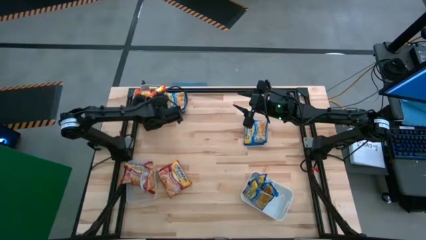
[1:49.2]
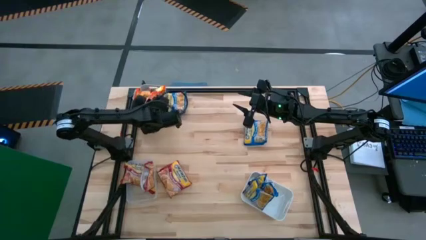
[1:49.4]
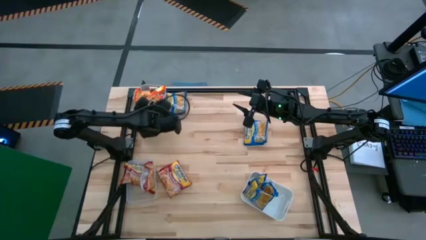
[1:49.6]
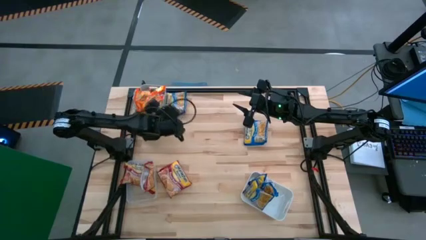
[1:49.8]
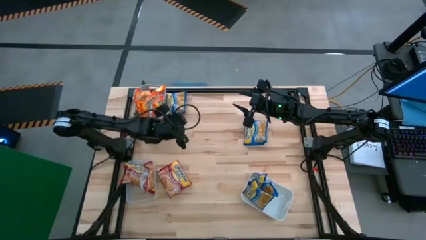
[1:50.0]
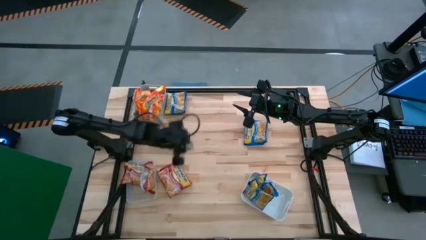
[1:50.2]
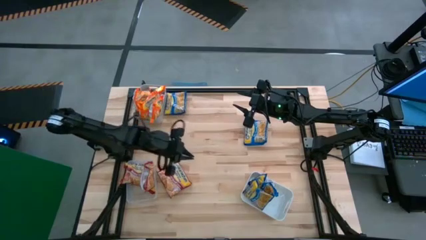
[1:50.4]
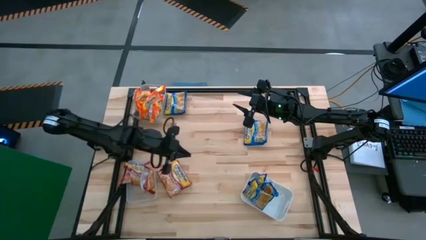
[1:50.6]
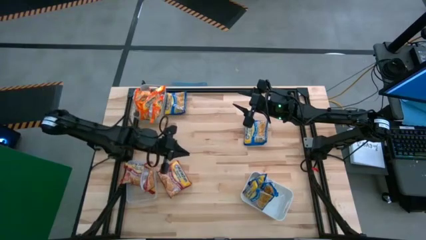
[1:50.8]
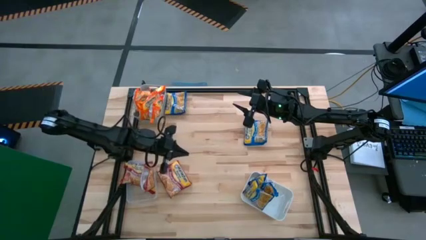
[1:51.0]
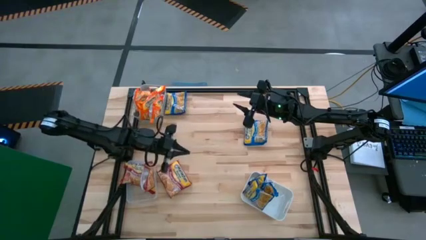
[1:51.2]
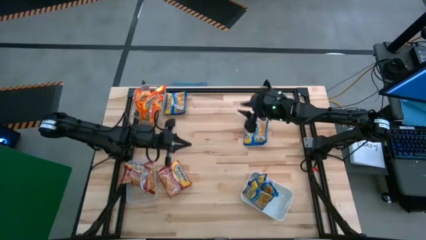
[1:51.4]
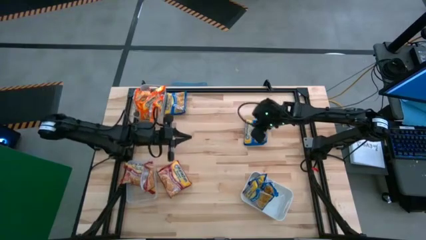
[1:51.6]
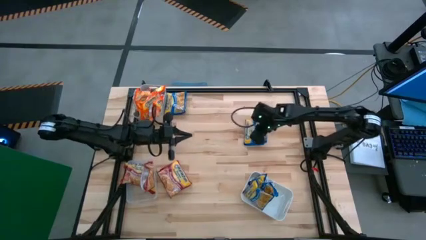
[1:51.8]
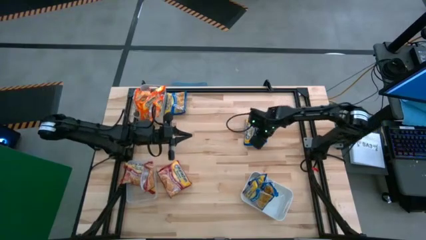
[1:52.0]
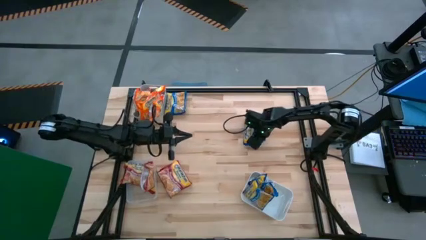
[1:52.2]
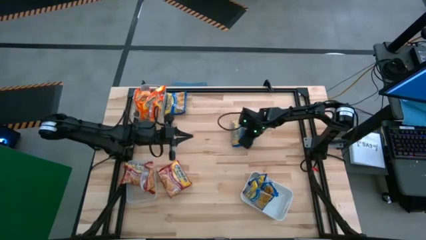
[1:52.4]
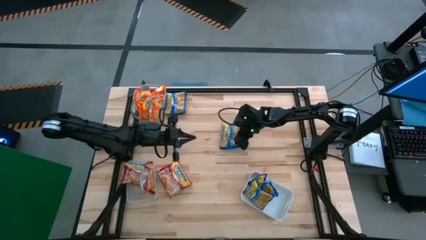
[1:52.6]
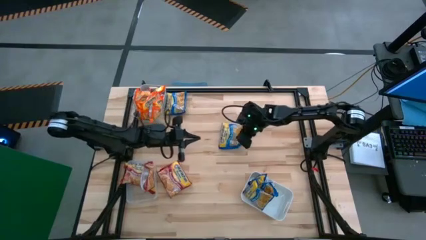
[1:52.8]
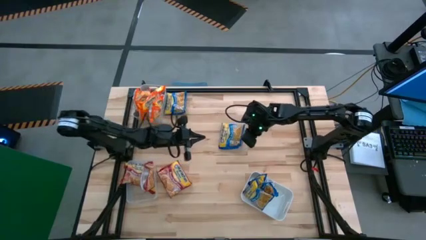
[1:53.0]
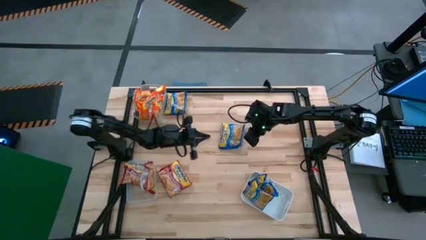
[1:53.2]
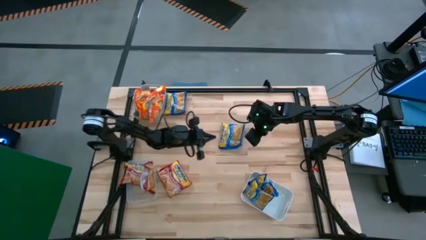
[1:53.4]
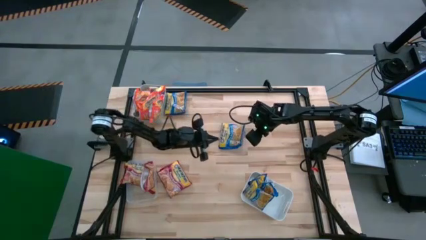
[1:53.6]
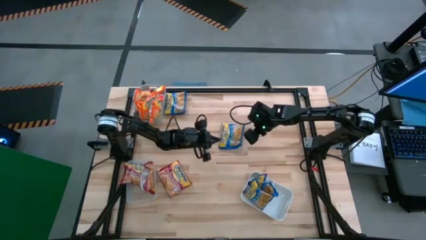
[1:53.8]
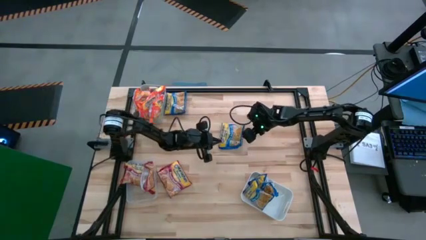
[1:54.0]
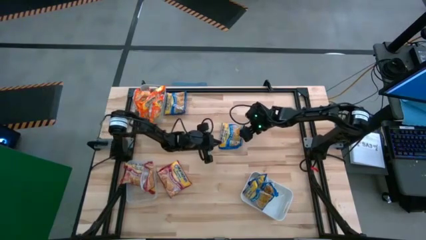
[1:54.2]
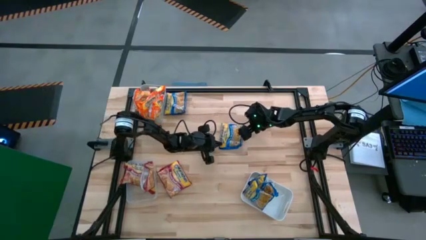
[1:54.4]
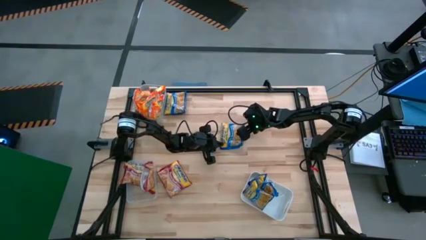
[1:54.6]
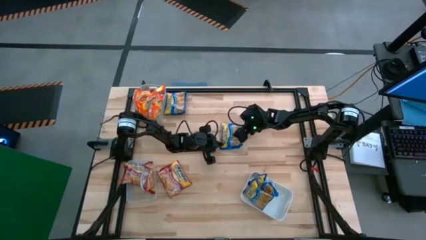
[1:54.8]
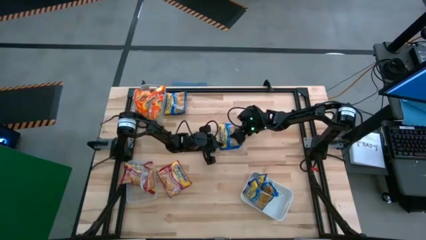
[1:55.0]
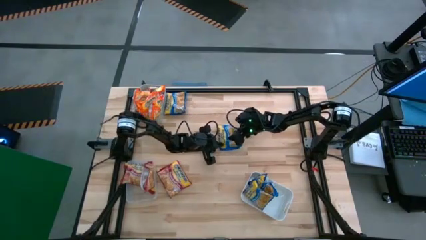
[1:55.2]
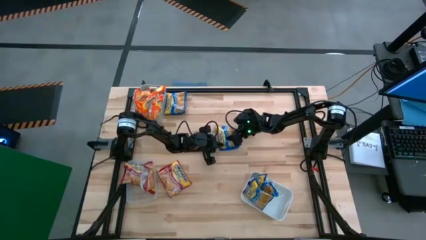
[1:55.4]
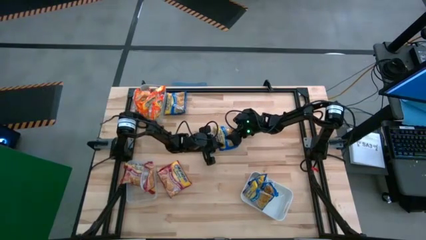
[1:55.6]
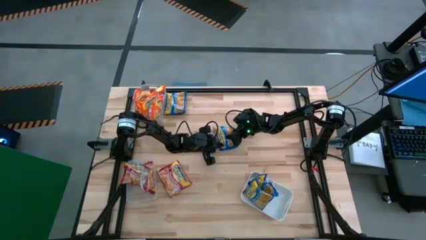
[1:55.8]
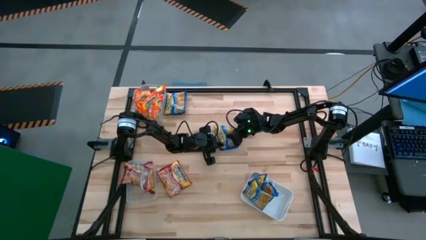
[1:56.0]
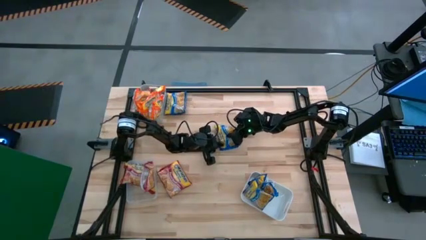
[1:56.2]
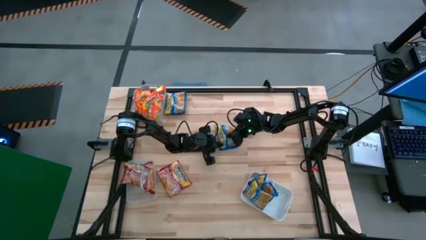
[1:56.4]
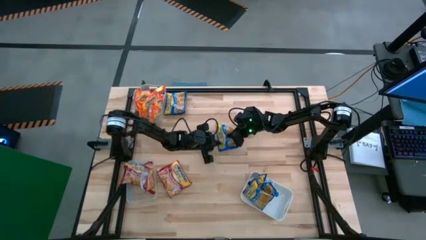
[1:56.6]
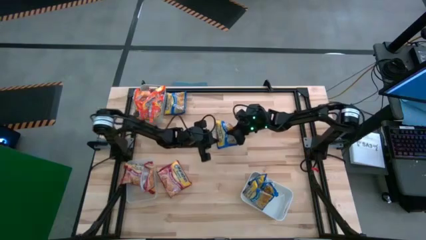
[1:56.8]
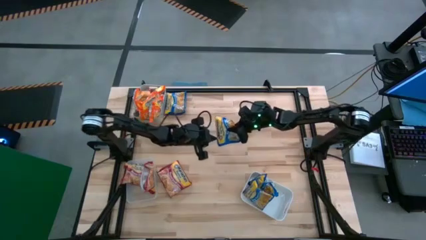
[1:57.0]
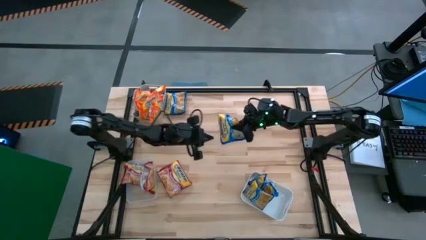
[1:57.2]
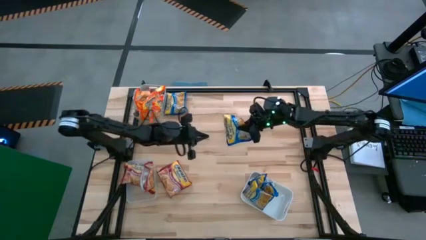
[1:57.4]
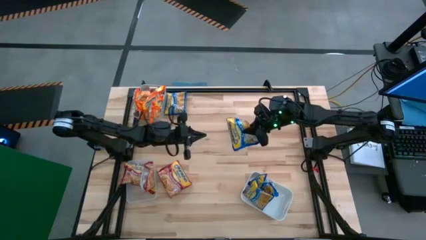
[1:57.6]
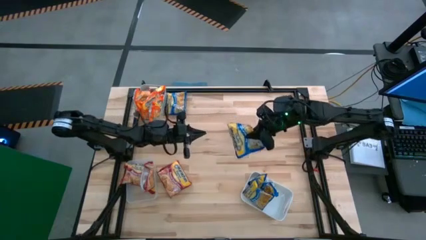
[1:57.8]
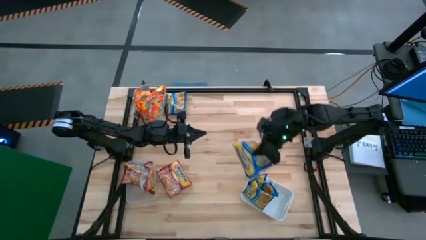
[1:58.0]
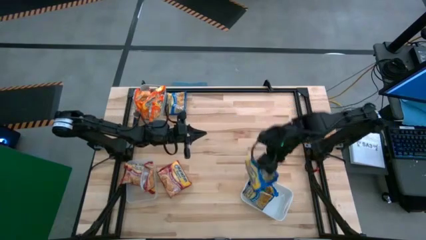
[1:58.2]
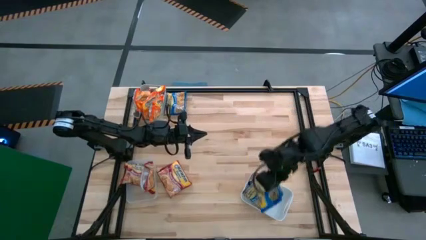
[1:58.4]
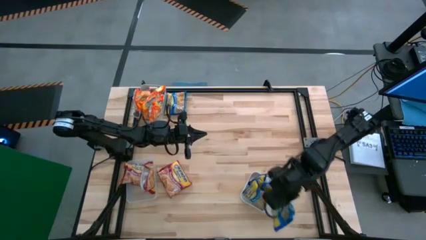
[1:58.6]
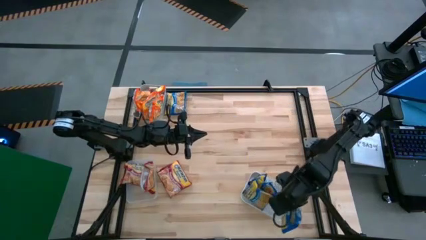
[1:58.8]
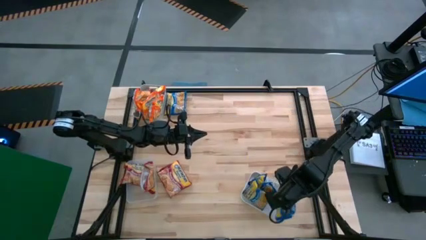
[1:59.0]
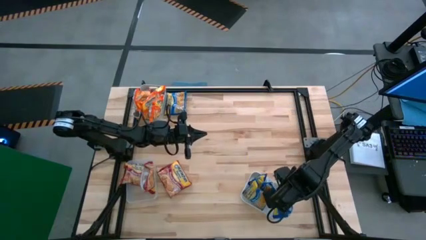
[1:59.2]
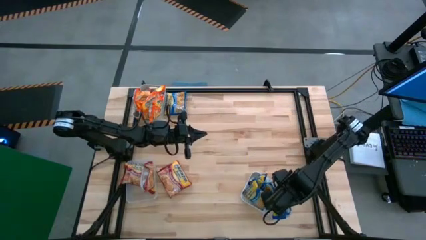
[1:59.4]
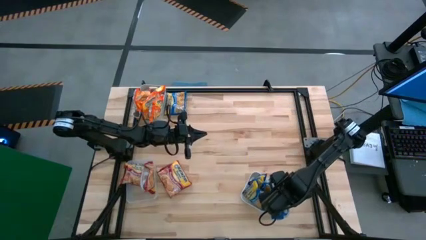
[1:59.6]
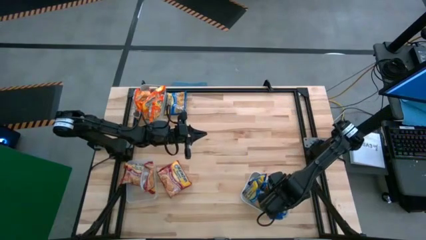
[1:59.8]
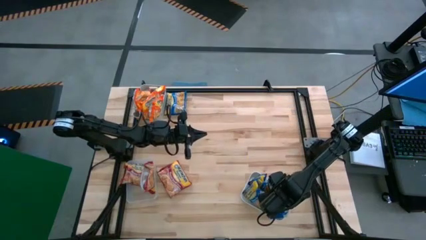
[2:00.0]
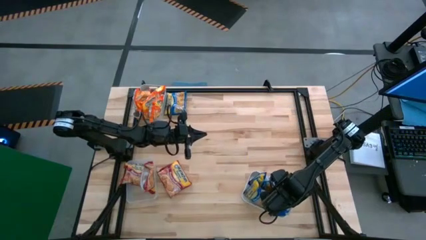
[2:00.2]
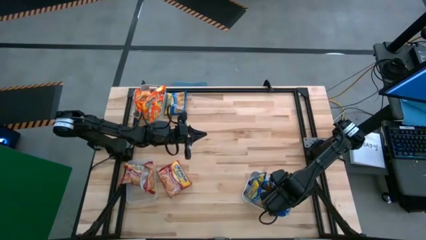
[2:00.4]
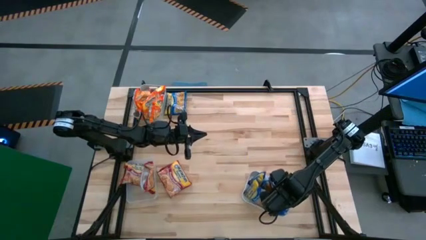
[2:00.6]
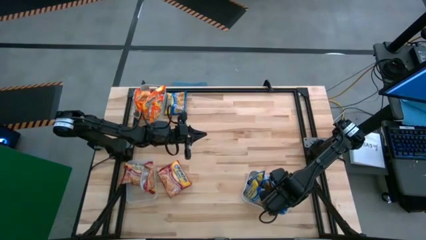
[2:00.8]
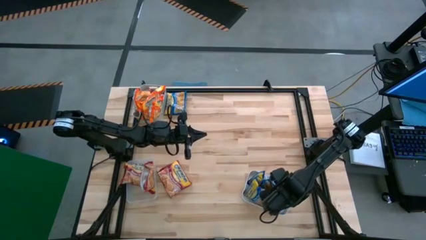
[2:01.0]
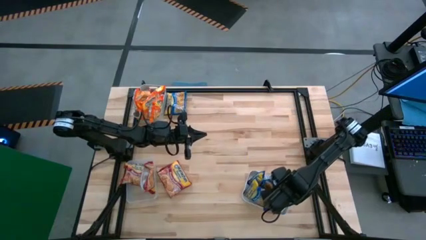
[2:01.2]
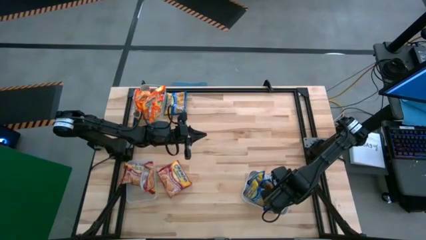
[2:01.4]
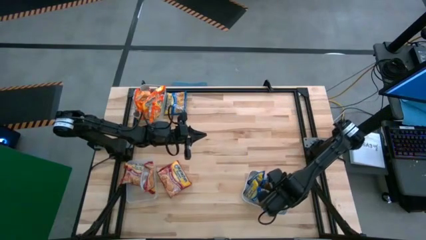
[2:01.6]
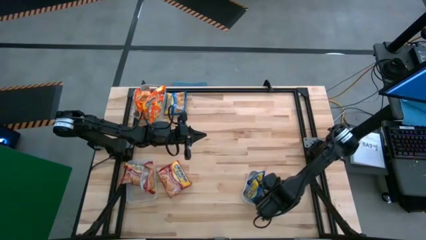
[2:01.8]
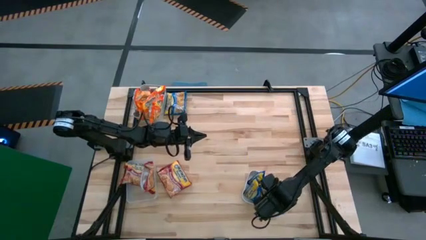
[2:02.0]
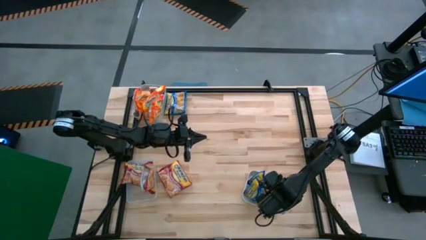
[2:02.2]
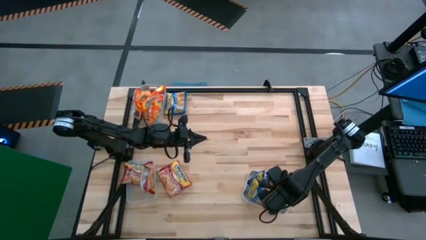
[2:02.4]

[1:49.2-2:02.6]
Task: Sort Maruchan noodles
Put the blue noodle pack into the white bin

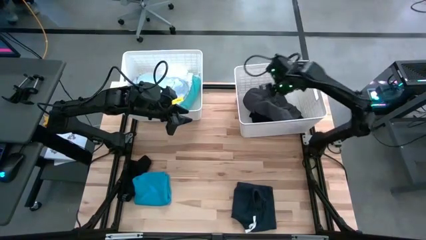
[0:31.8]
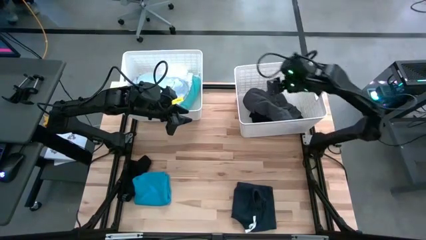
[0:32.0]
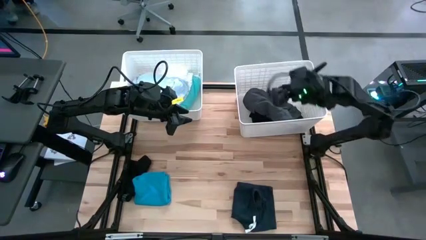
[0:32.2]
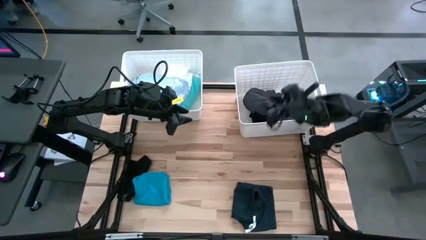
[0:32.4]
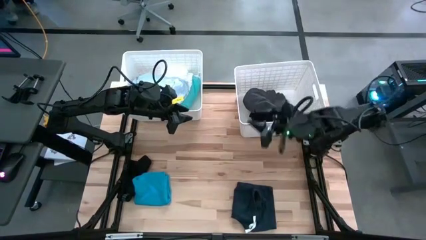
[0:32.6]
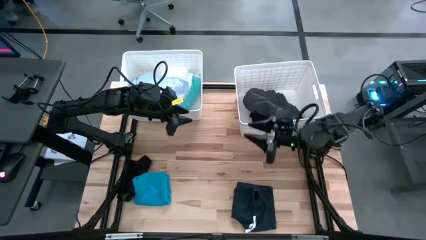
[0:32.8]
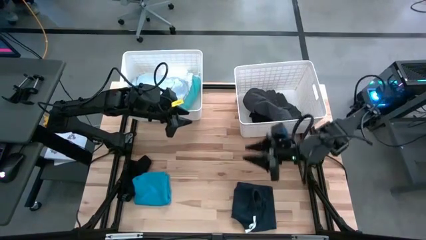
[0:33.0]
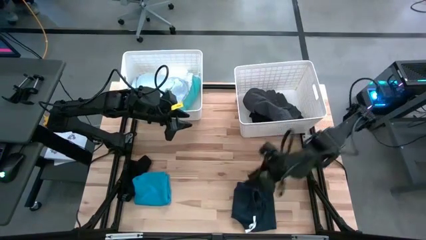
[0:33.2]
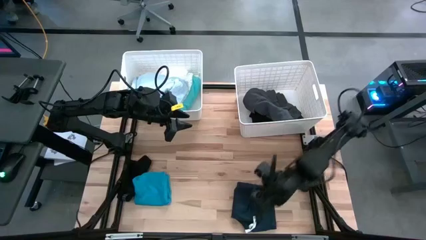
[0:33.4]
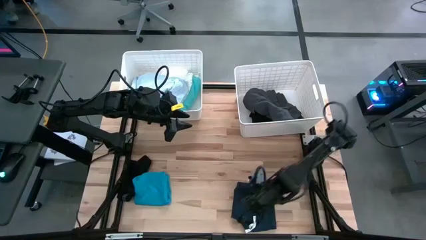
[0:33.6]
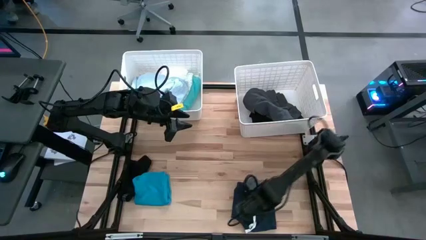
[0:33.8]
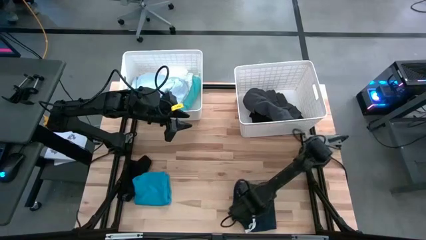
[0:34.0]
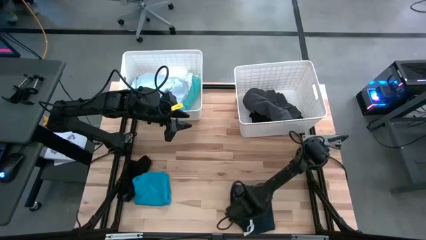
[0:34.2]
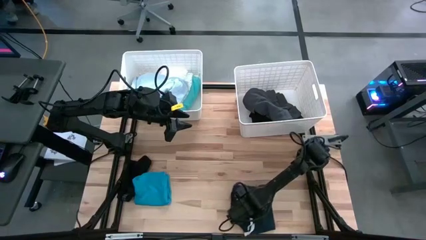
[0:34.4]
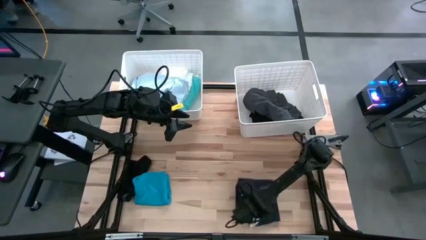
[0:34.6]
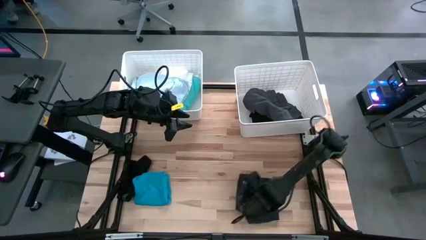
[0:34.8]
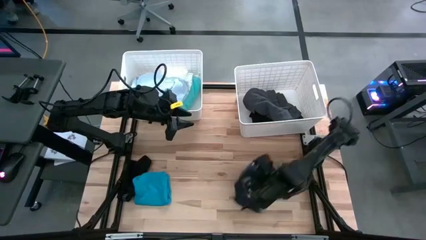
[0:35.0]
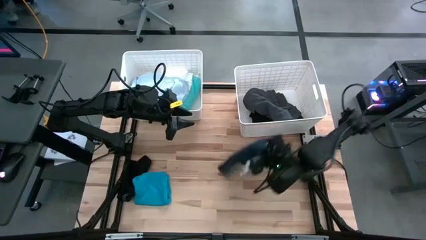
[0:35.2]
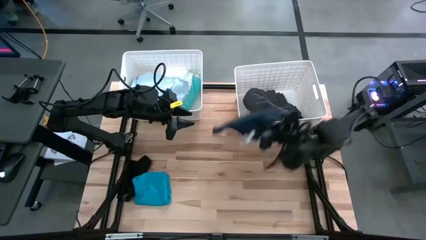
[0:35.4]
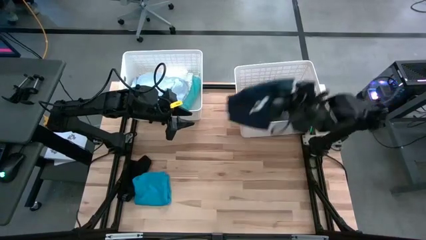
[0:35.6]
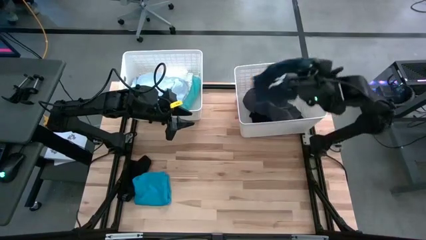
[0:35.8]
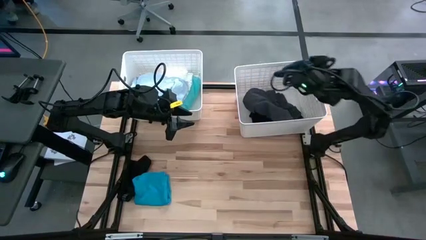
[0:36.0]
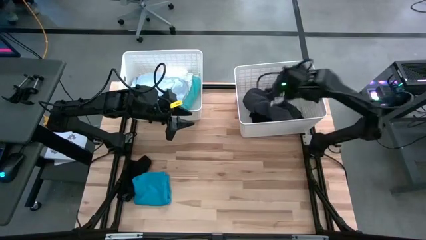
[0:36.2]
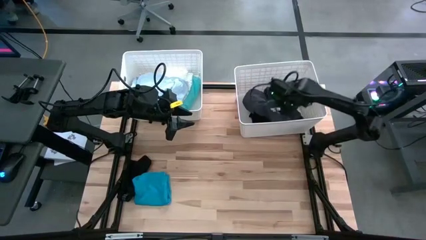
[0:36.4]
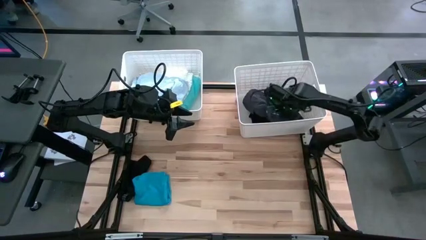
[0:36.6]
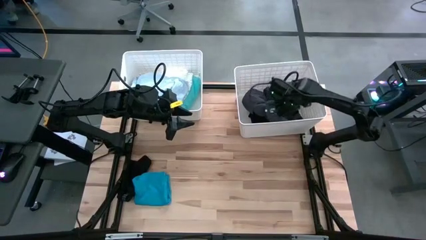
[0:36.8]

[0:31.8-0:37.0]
Task: Sort clothes
Put the black shorts into the right white bin
